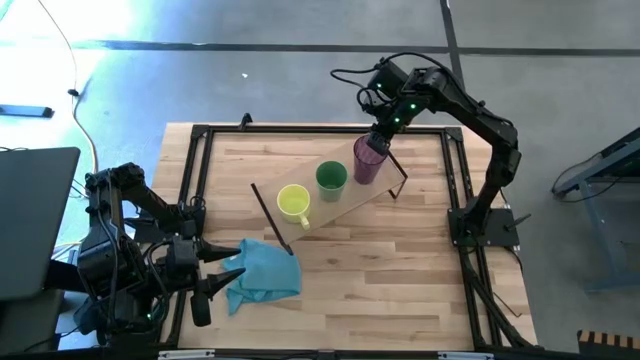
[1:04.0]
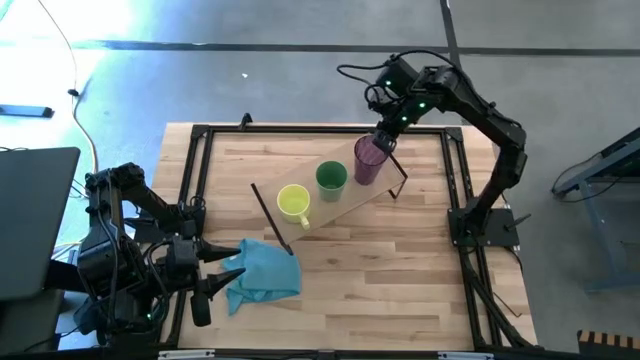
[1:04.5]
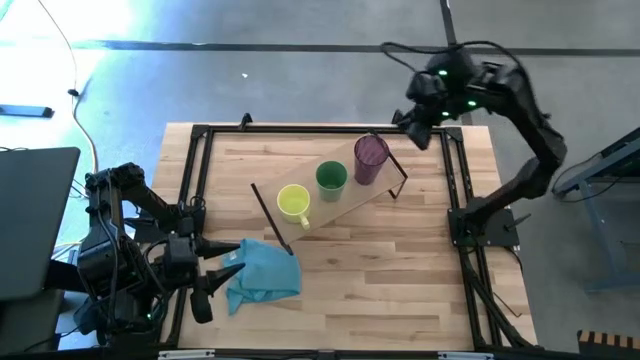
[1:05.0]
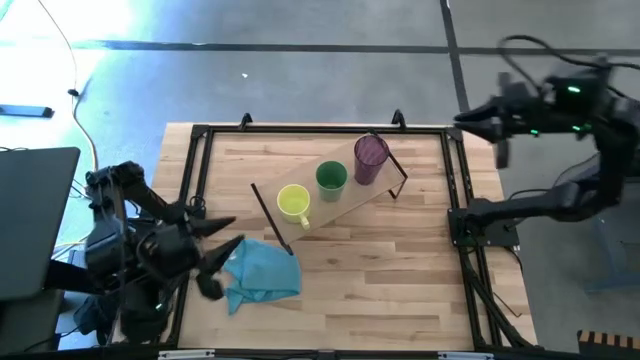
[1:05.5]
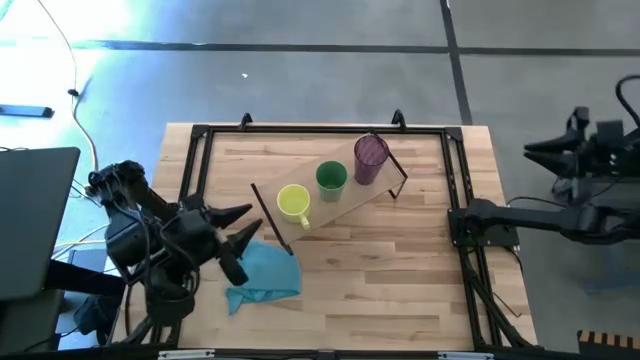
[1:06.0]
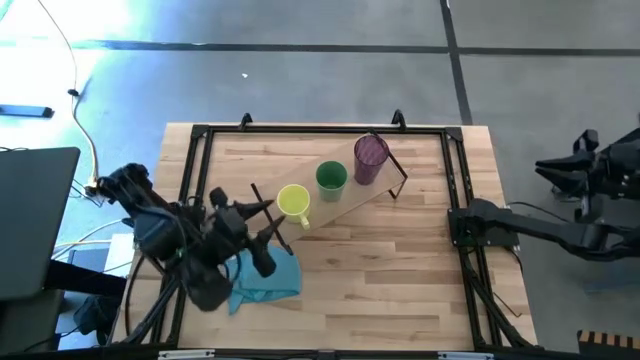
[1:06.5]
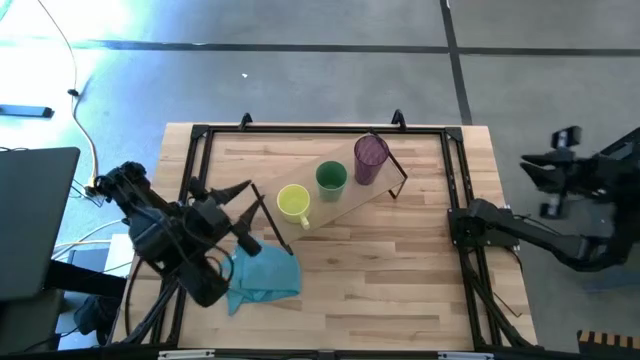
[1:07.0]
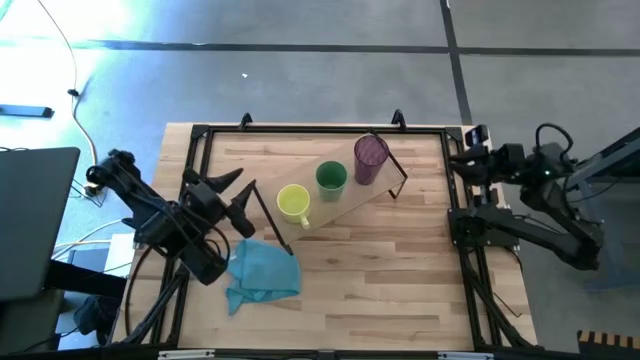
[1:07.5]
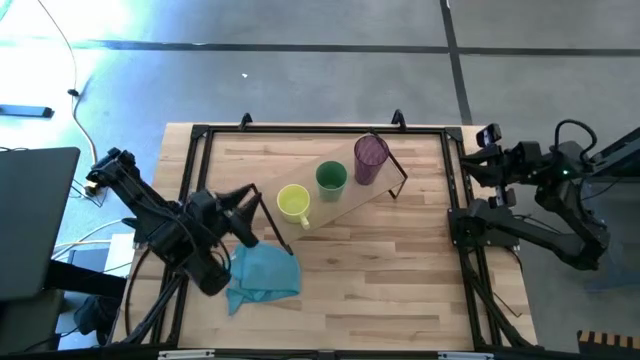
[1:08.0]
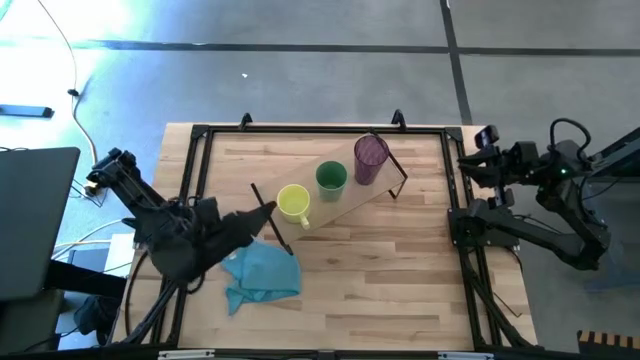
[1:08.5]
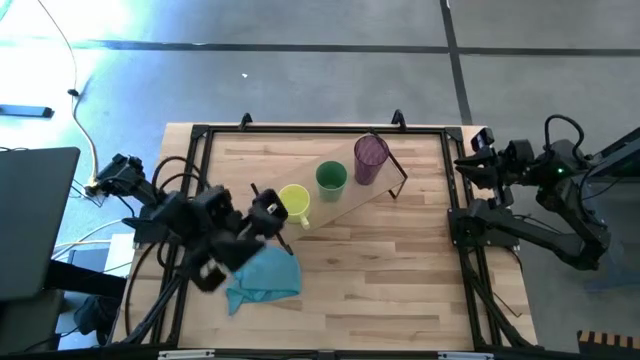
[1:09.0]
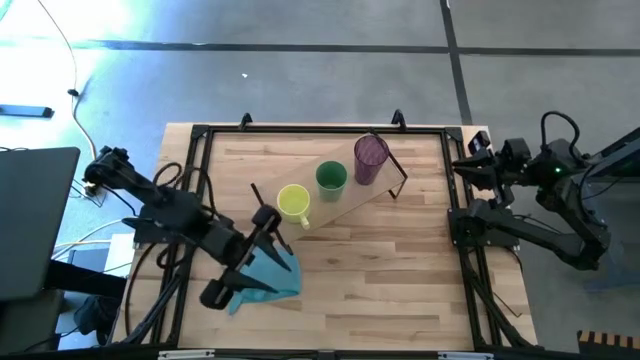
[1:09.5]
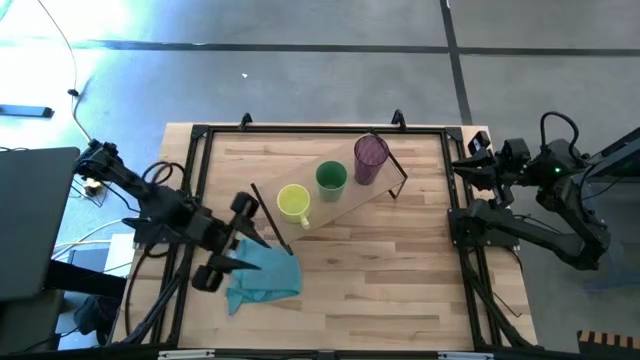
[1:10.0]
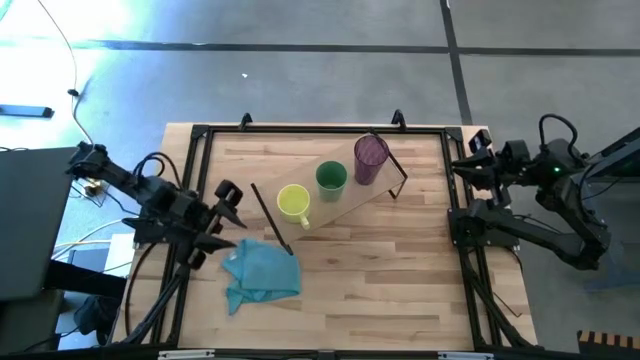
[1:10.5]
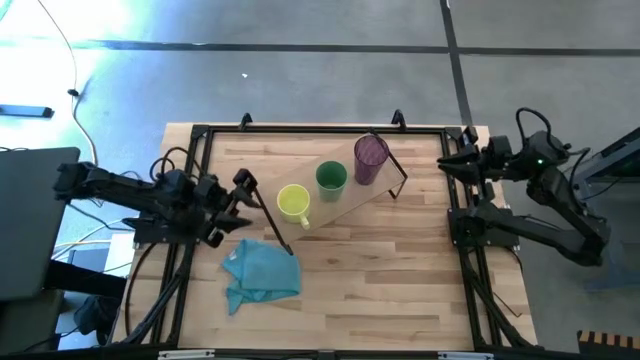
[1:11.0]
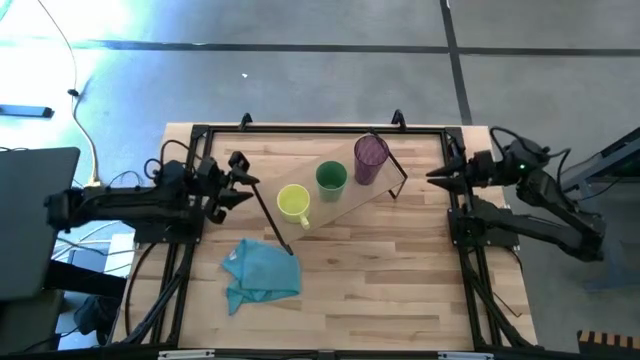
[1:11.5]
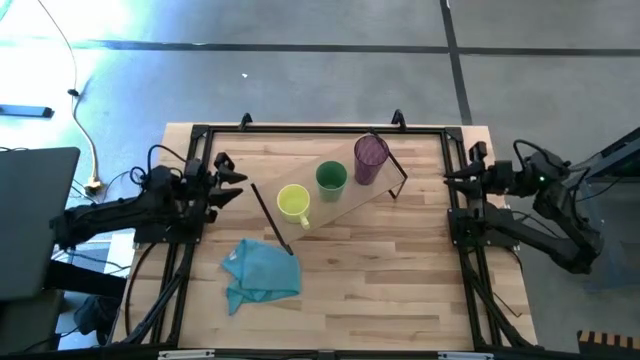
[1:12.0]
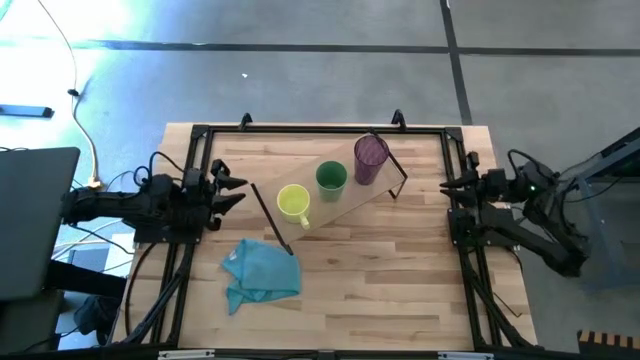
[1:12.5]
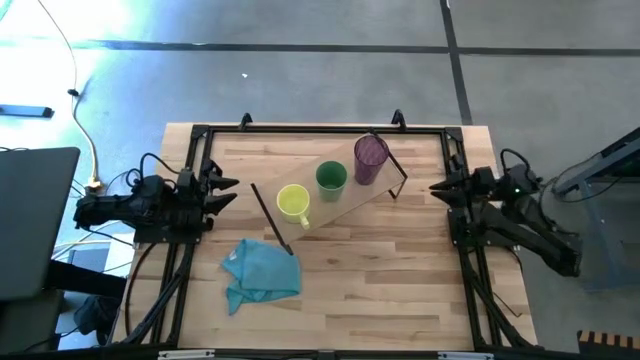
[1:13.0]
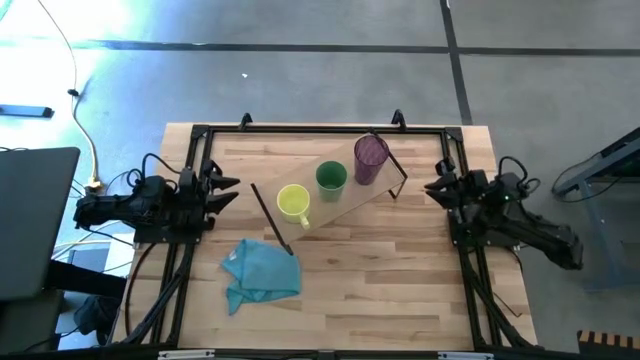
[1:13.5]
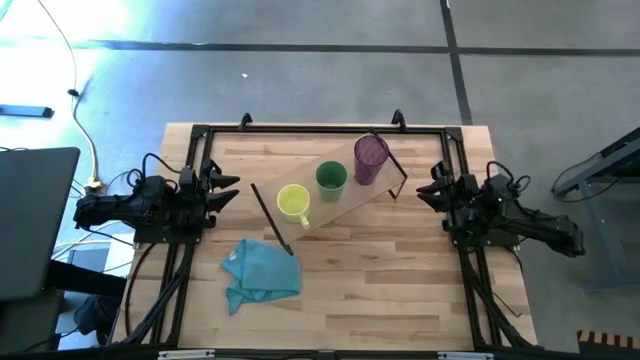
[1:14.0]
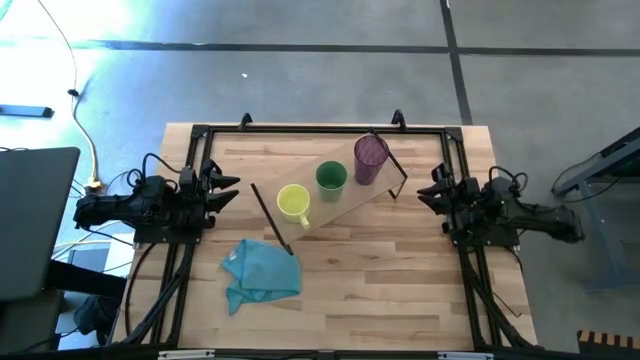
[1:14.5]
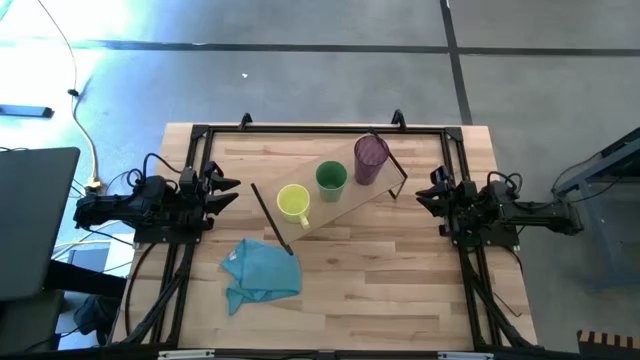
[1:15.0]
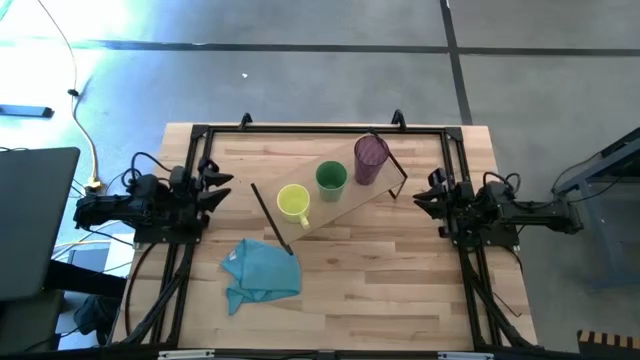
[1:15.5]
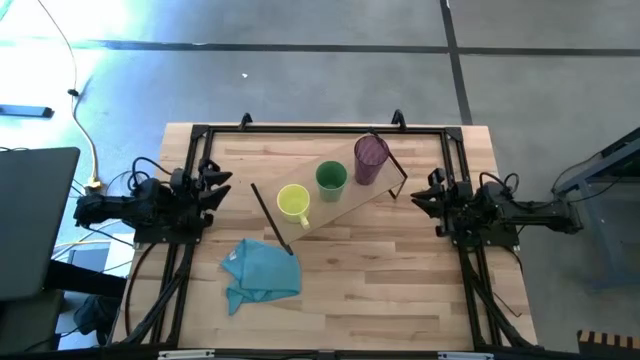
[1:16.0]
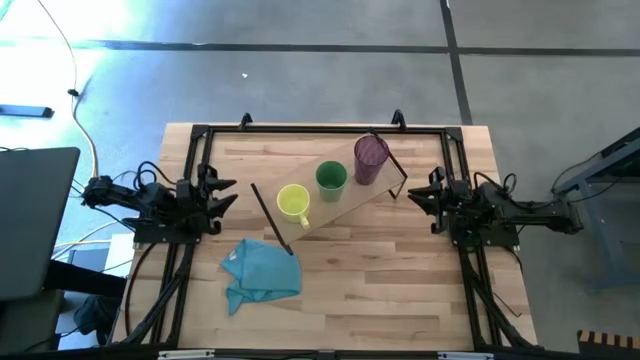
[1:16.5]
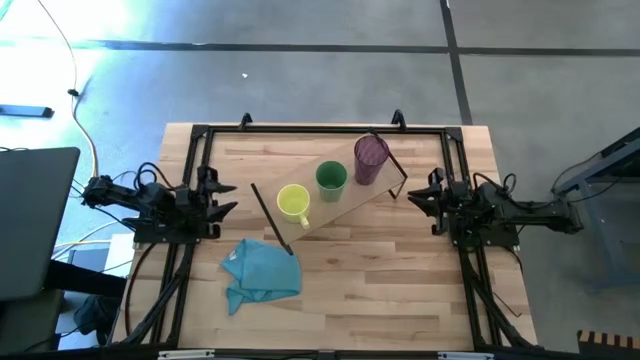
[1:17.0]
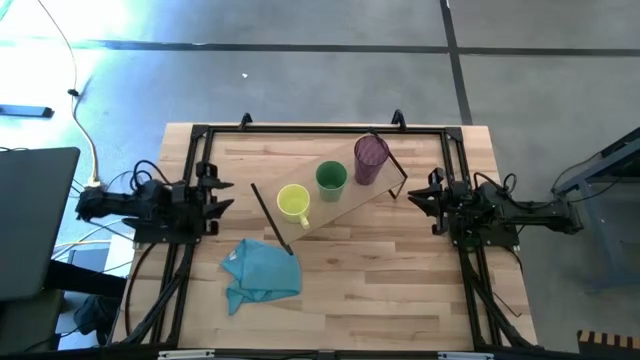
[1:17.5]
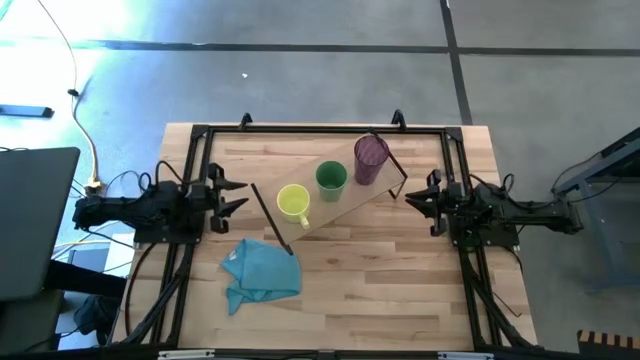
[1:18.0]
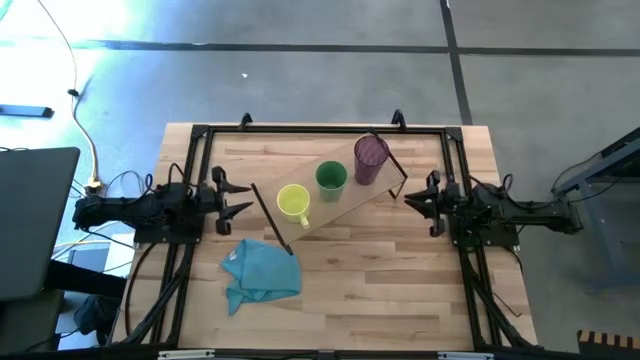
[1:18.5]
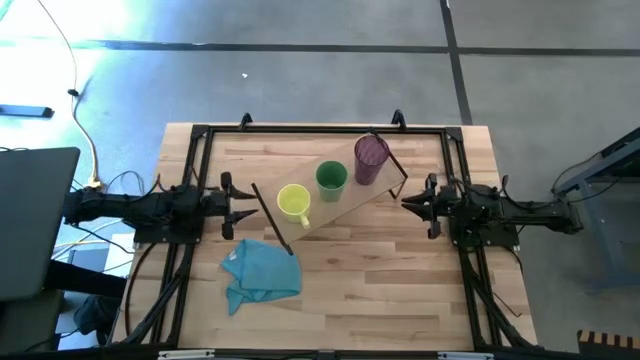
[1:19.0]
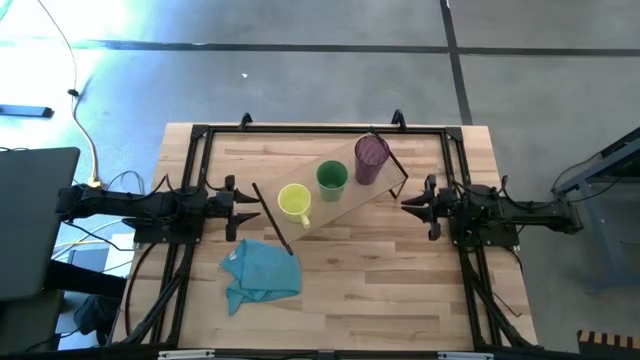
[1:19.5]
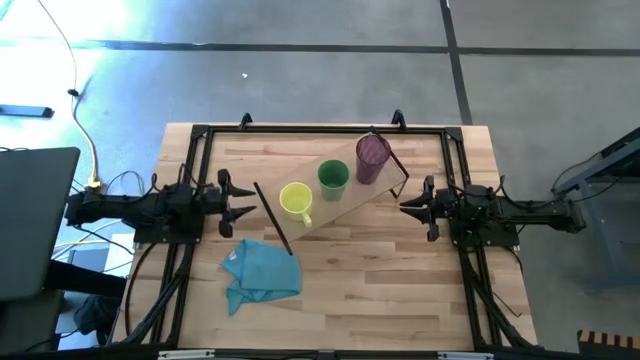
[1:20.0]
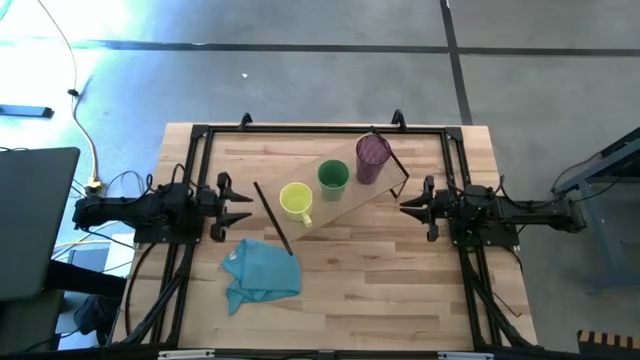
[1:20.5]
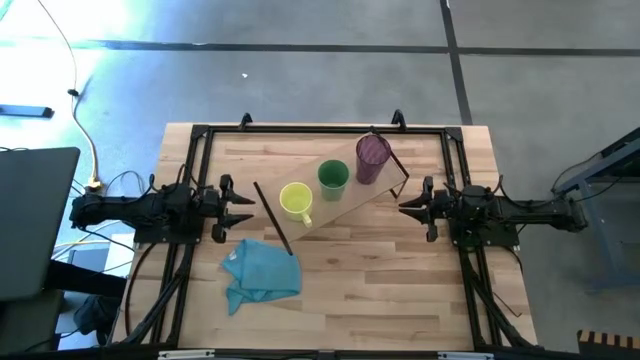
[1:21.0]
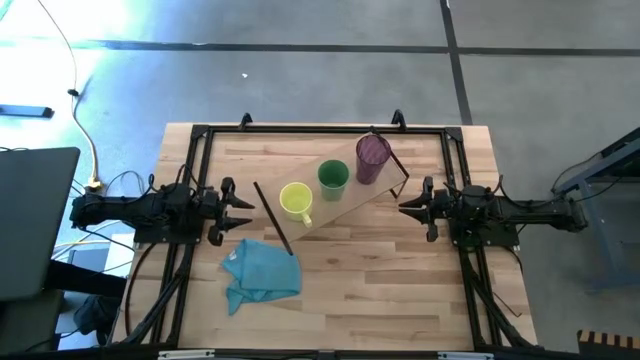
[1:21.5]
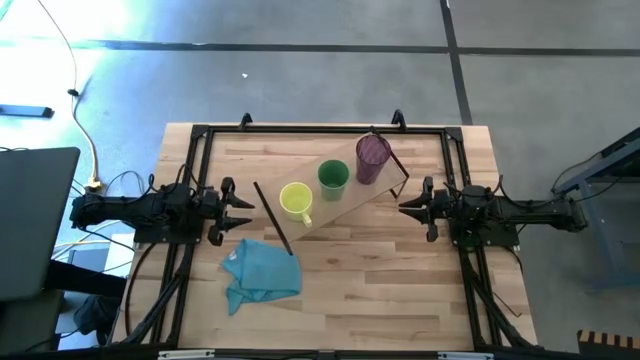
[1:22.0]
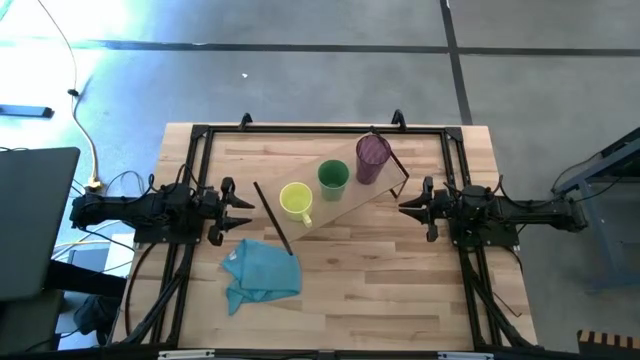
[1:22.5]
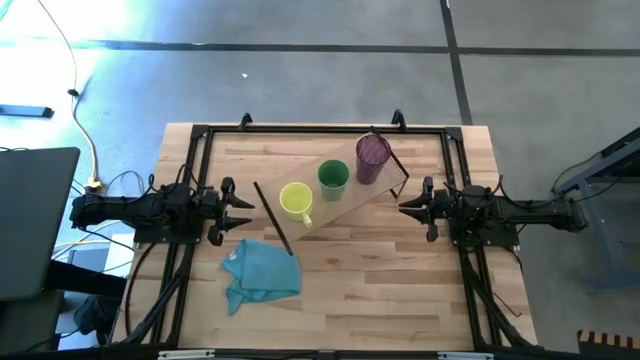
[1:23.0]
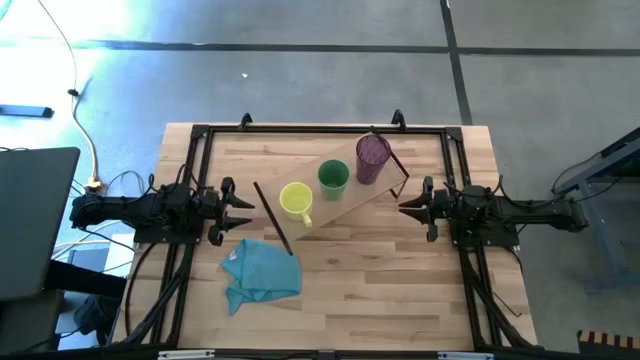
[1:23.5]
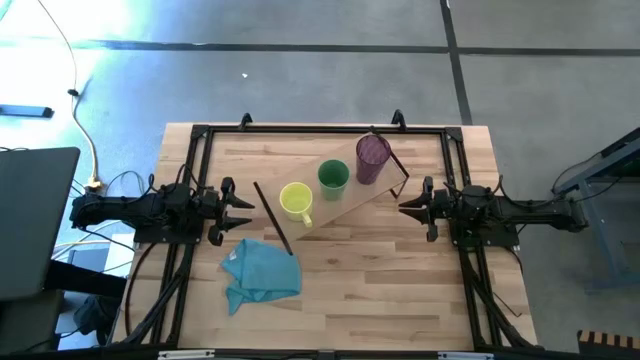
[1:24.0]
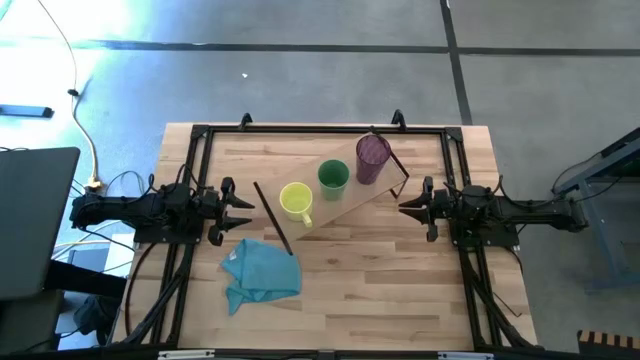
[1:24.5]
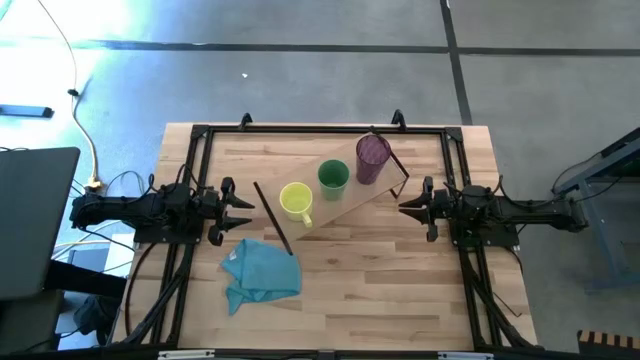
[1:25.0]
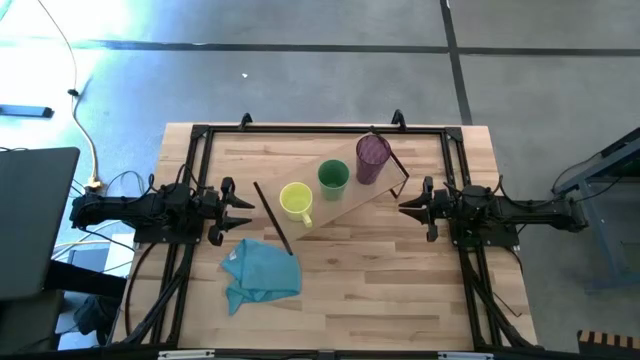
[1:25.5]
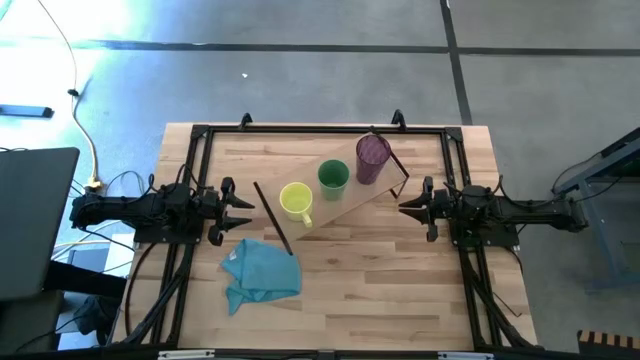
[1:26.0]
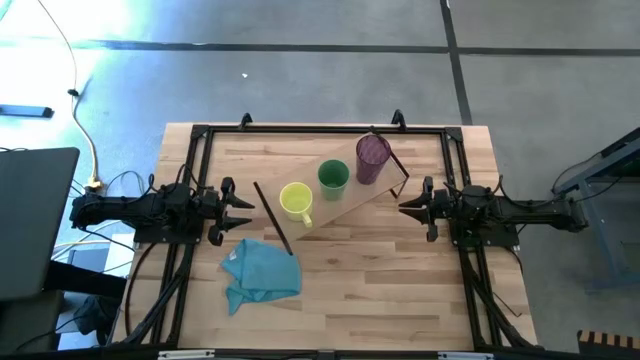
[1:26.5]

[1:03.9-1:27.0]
Task: Stack small to large cups/mugs on shelf
Return to Home Position
